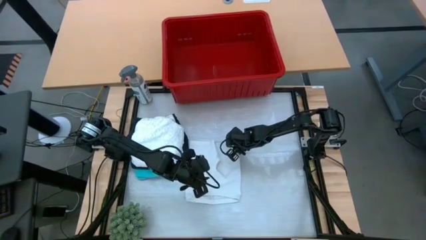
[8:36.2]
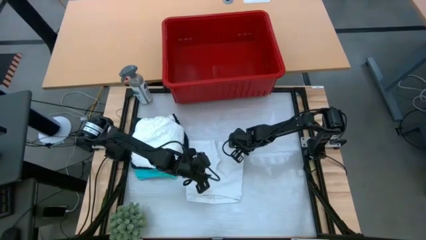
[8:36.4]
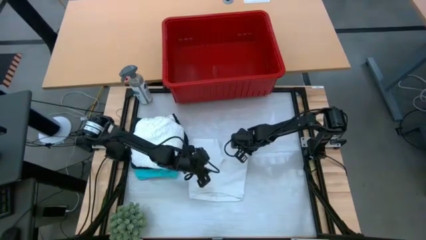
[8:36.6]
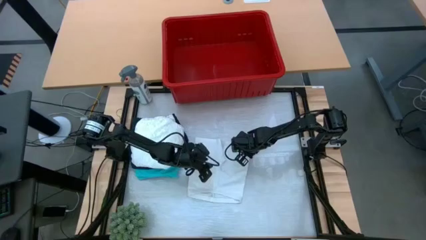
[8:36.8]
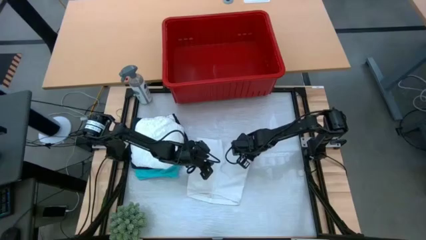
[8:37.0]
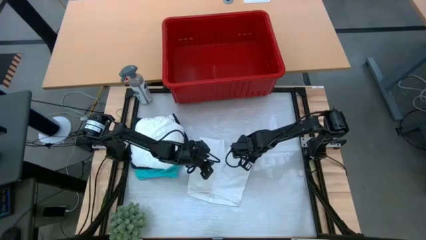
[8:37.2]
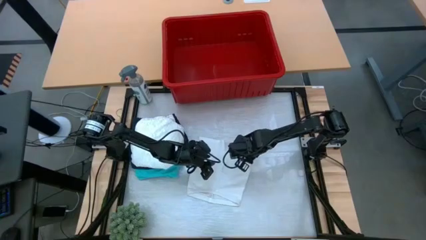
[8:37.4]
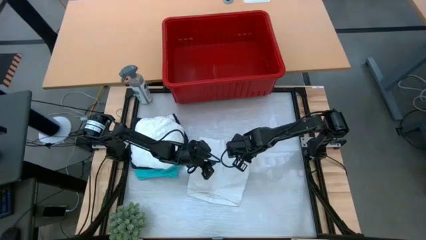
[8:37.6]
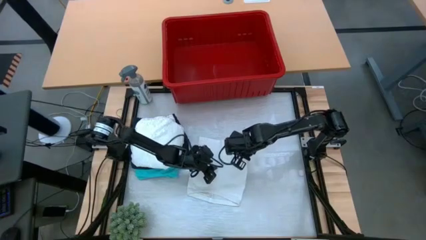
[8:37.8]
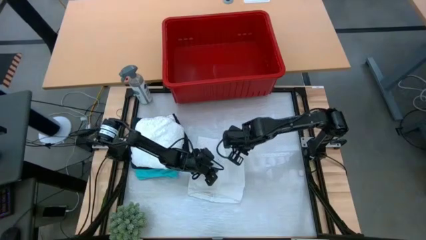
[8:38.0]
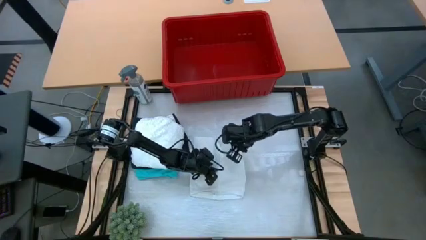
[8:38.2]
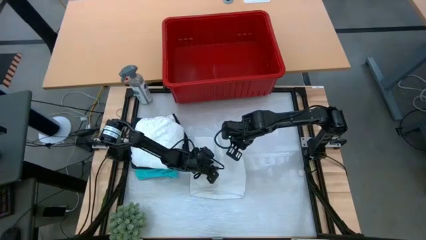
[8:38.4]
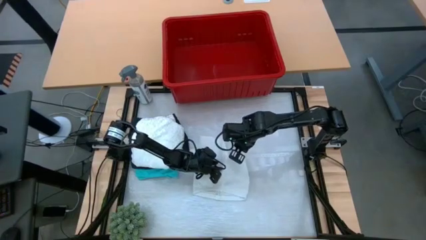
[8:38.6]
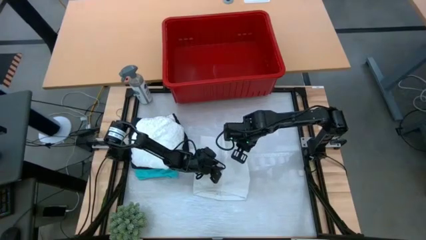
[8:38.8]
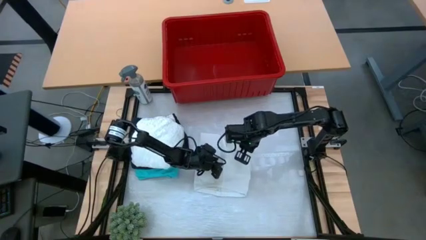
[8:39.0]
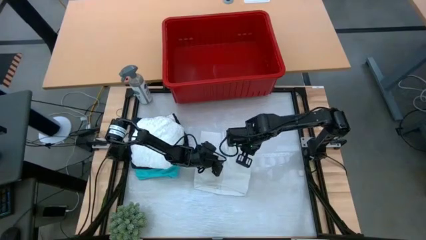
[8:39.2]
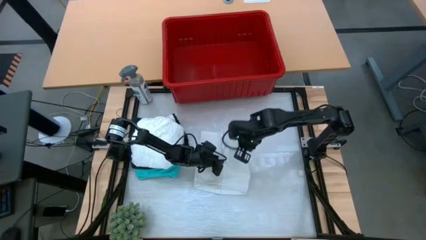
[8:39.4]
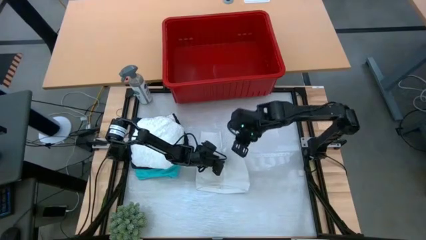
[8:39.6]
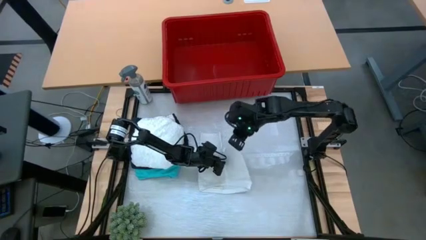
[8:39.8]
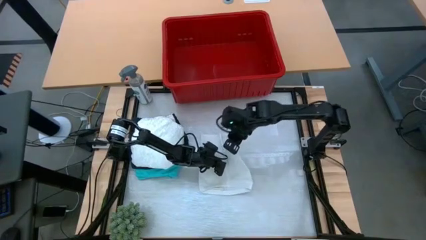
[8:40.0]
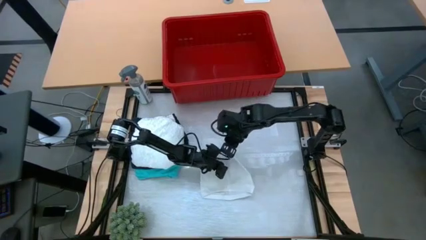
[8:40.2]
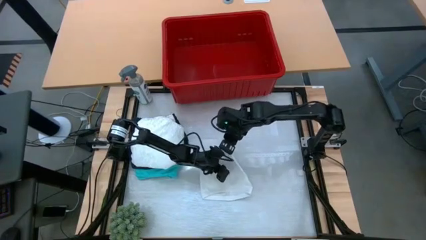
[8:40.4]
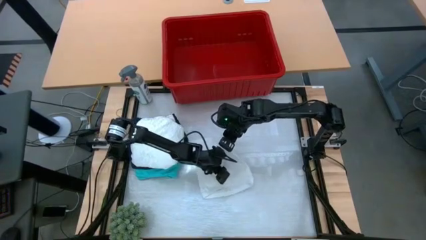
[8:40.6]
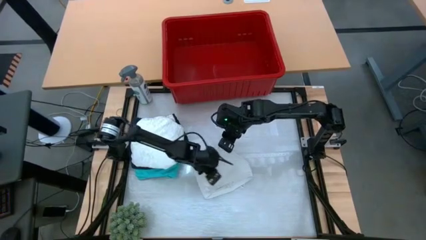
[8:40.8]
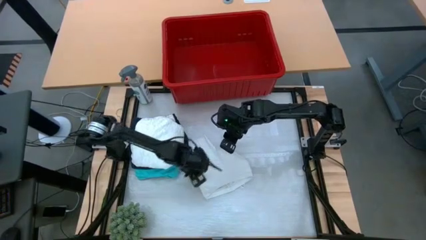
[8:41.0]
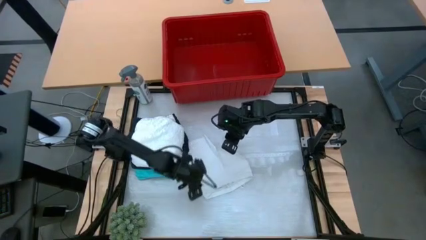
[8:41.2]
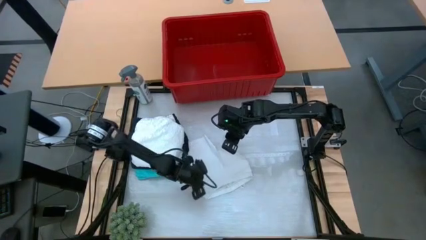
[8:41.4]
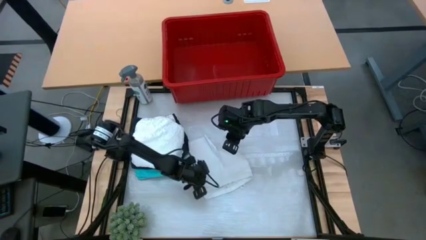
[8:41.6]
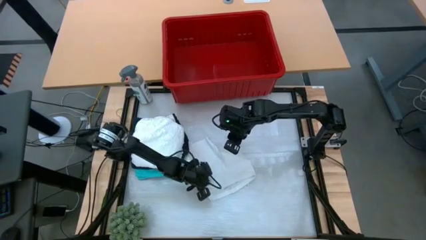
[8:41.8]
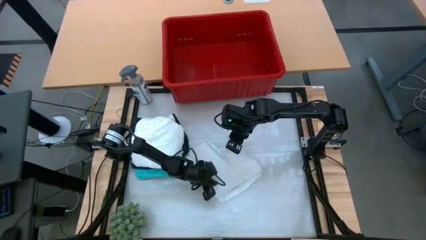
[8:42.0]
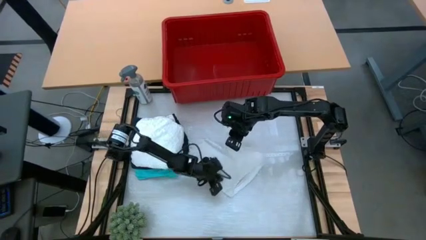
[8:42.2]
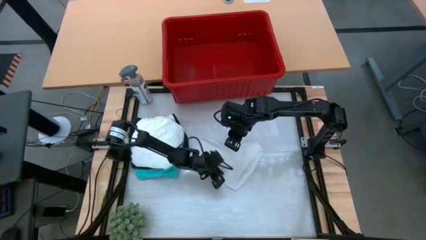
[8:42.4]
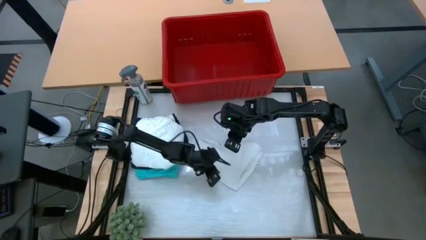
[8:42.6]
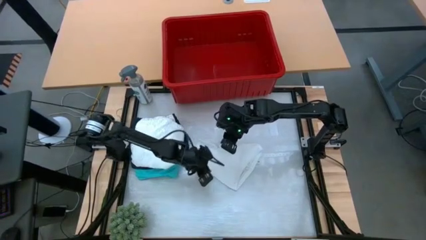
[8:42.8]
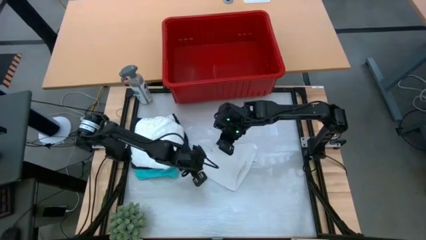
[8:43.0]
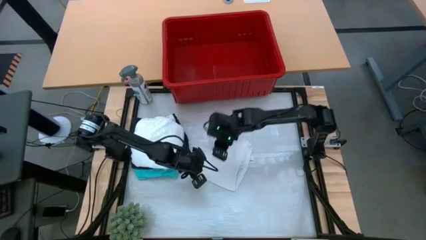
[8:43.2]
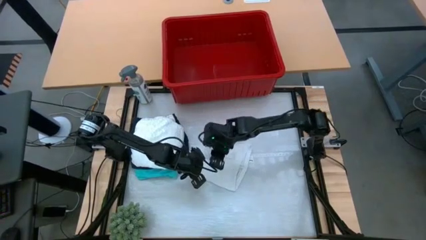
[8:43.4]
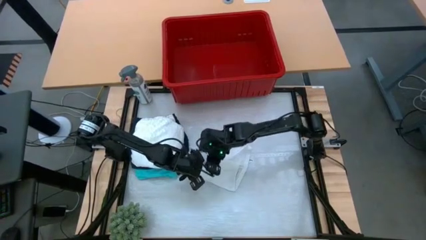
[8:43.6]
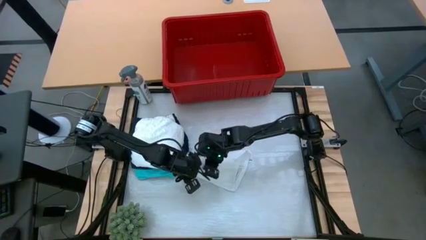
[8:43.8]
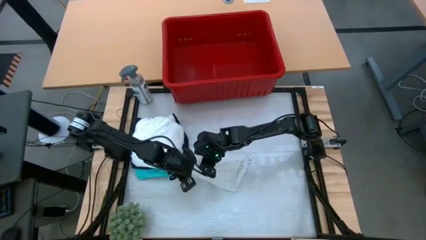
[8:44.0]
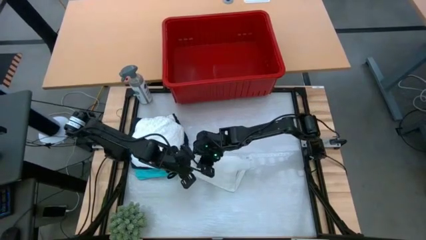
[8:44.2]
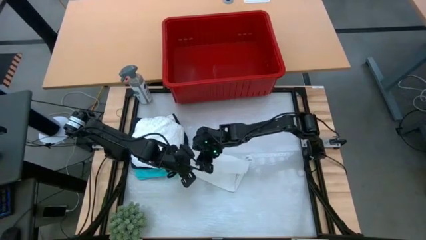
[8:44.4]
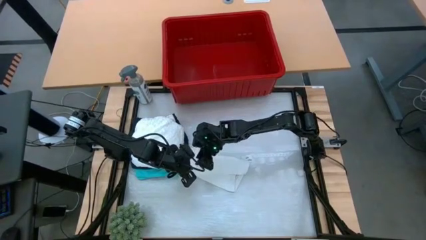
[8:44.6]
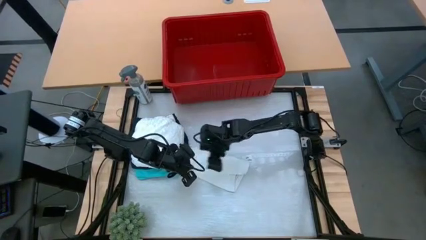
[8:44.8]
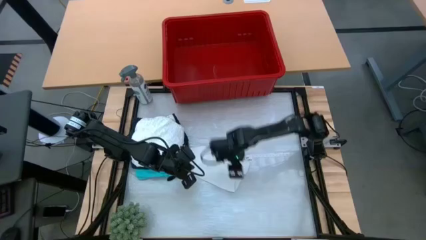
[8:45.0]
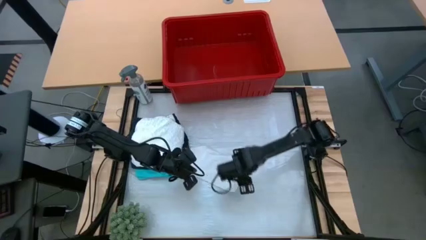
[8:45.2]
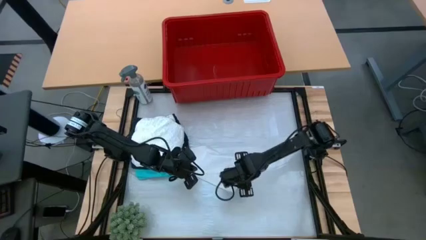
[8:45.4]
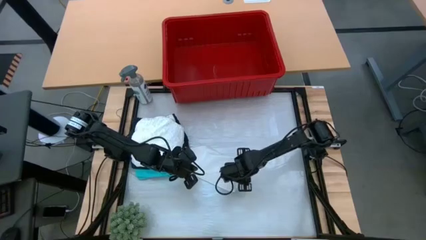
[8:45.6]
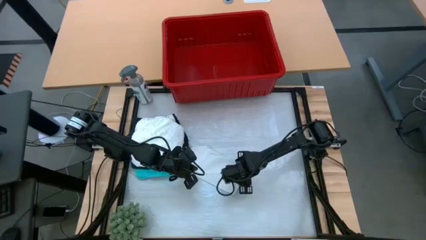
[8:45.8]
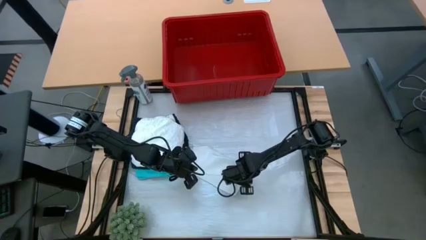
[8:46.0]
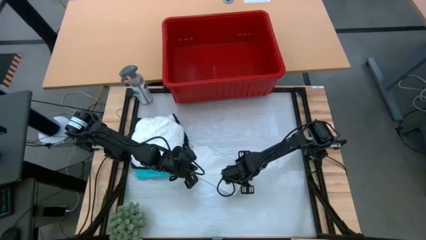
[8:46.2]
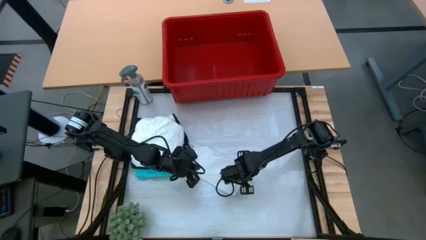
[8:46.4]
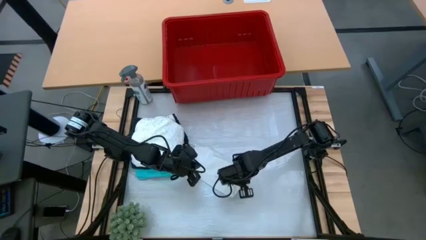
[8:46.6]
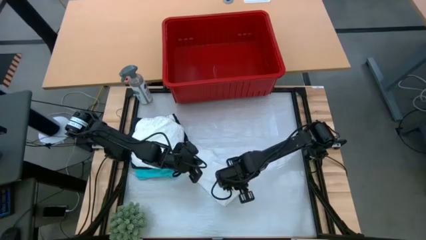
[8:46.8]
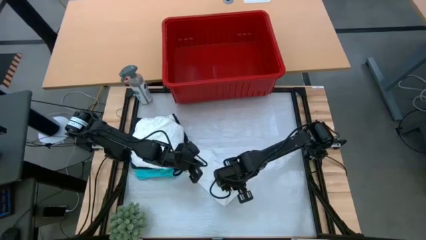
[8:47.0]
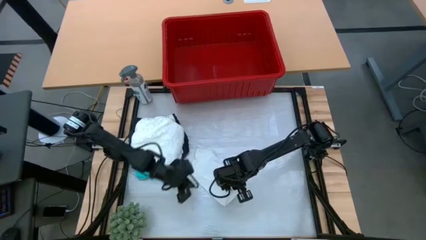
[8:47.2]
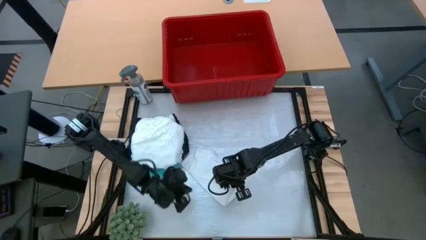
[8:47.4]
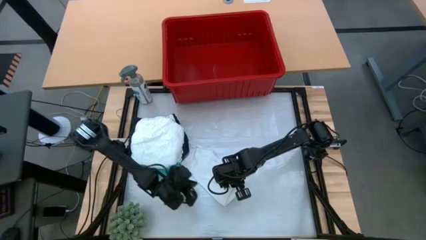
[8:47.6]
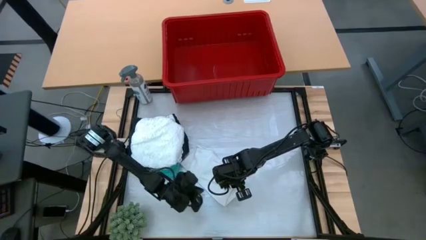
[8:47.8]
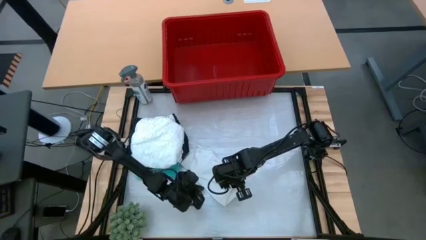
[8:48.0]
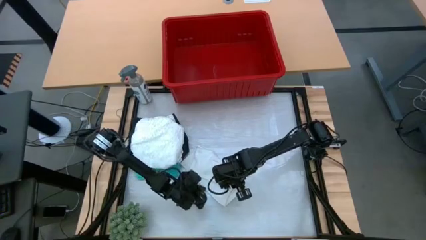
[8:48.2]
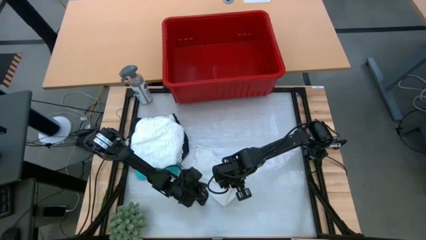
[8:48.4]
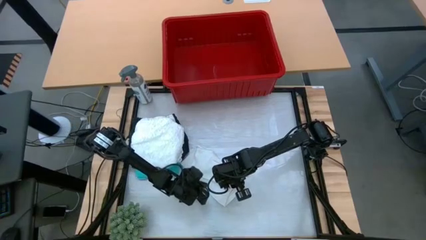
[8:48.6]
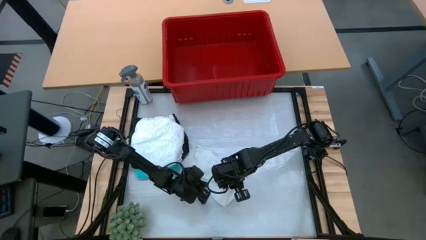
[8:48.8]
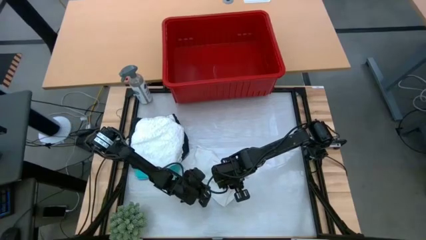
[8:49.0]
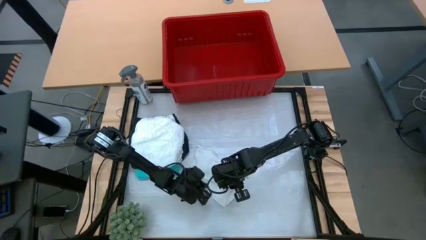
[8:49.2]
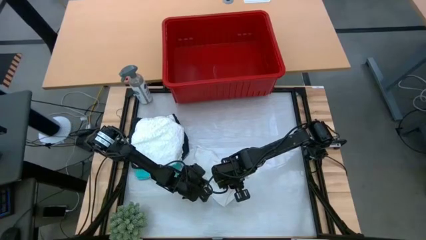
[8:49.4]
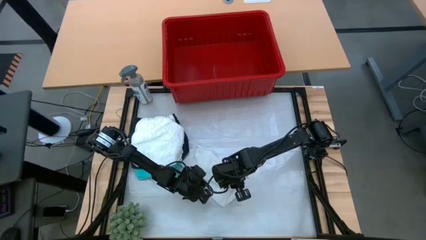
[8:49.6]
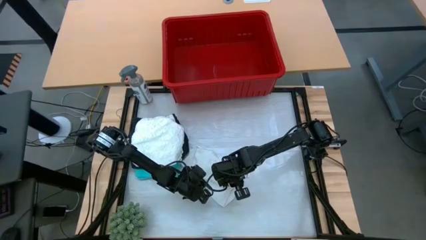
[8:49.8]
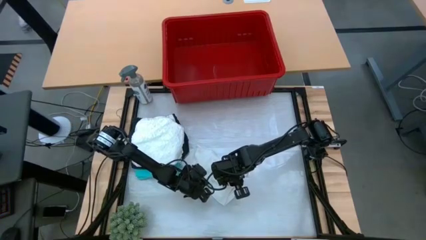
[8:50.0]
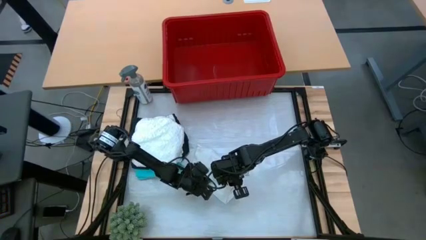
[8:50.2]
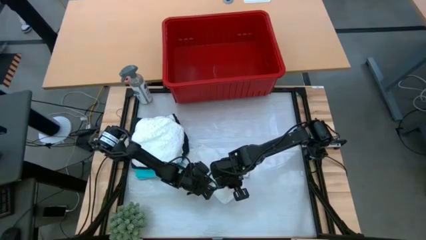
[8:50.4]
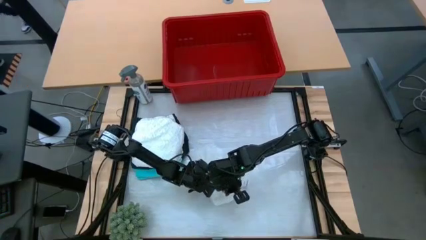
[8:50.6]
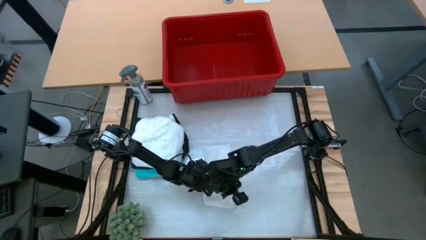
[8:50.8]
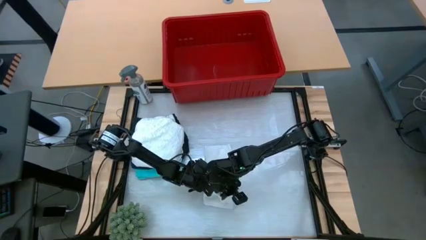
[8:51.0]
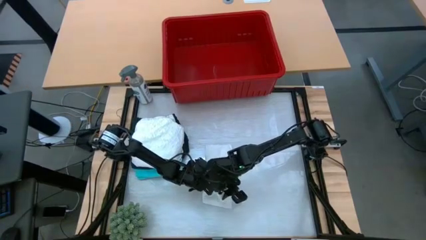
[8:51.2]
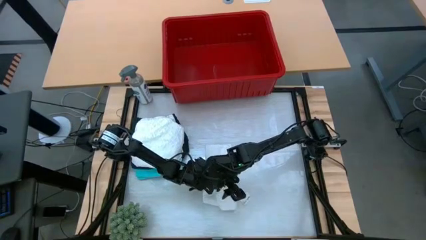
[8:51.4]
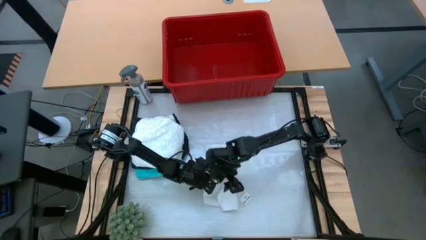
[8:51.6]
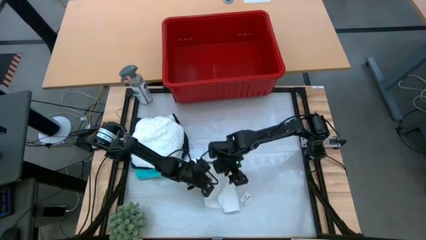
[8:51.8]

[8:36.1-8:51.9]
Task: Fold laundry
Fold the white shorts

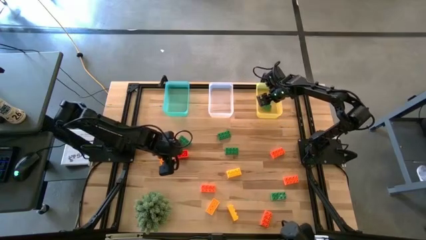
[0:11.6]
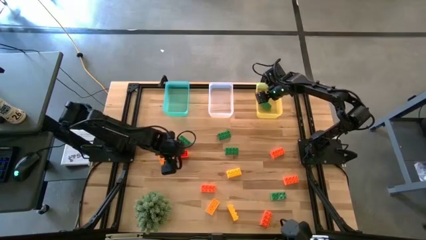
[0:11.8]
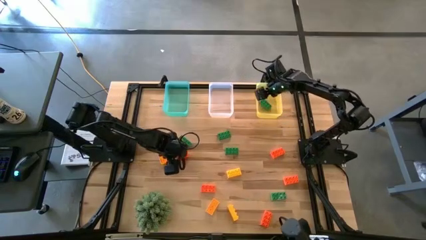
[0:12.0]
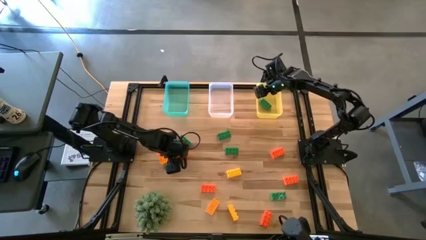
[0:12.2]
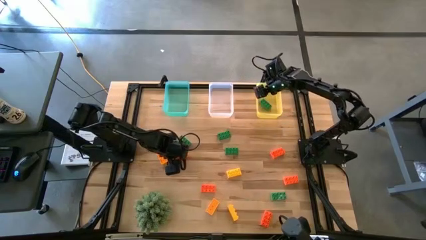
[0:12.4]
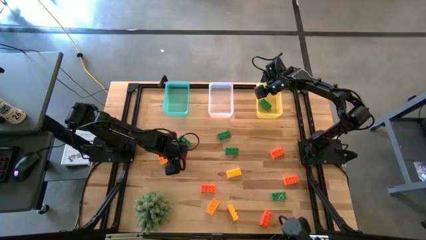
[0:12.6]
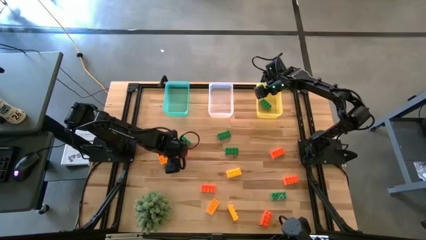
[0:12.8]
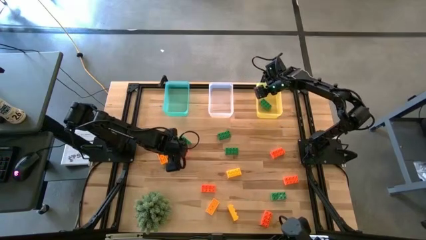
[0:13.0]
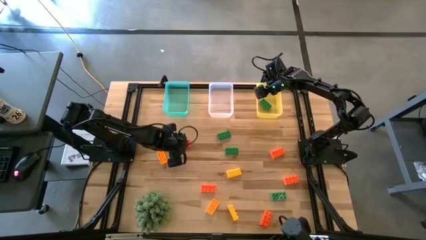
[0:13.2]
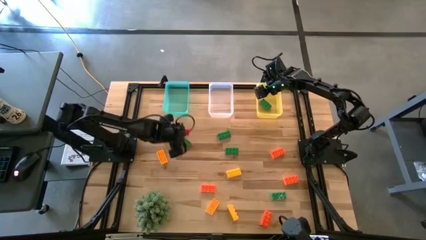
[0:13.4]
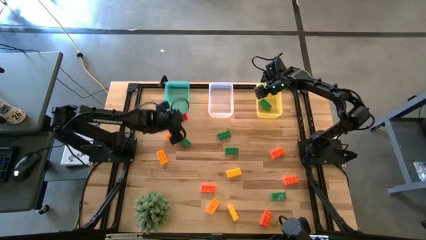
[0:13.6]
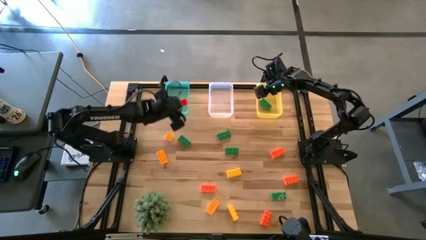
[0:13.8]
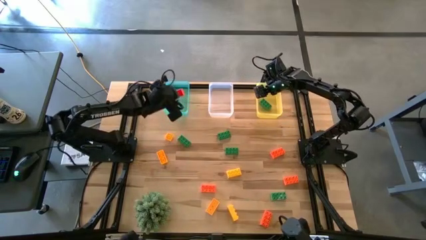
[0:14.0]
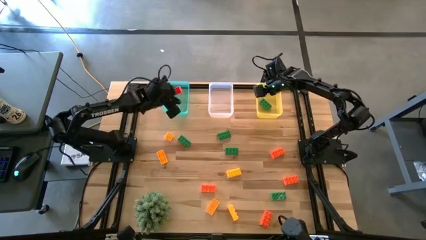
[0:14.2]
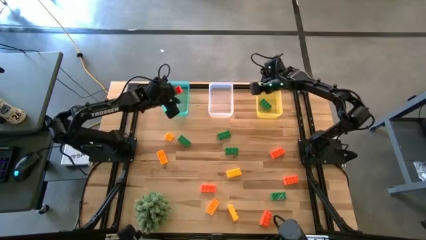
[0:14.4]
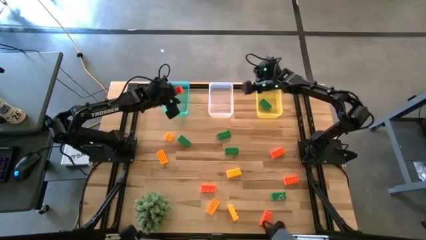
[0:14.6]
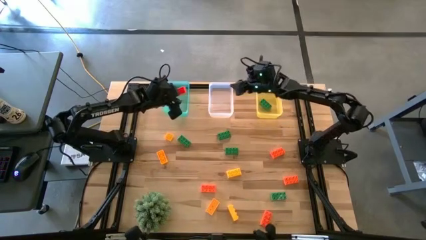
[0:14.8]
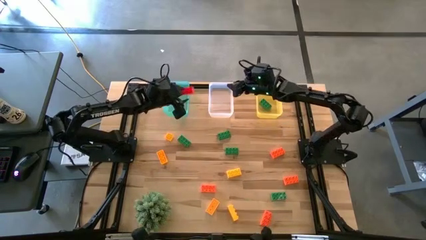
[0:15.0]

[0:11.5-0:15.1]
Task: Sort & place blocks by color
Put the orange game piece into the blue bin
